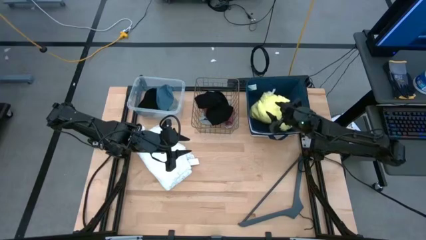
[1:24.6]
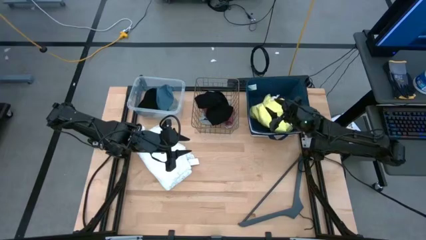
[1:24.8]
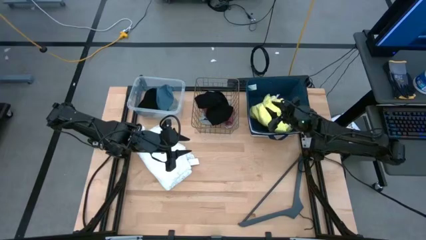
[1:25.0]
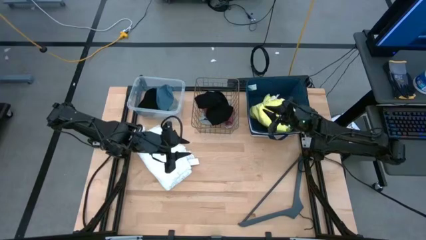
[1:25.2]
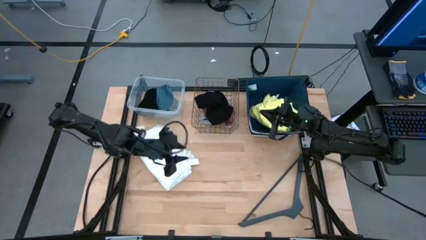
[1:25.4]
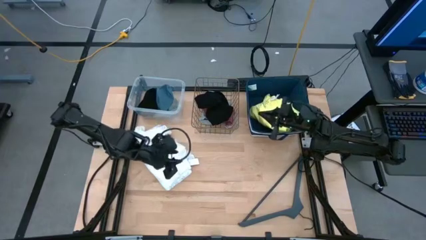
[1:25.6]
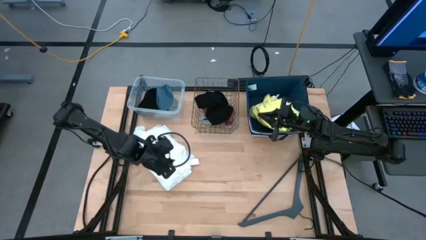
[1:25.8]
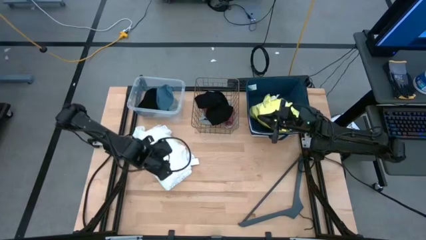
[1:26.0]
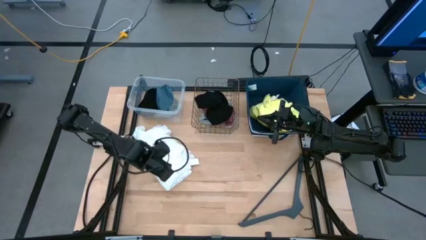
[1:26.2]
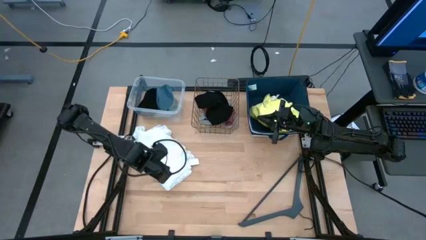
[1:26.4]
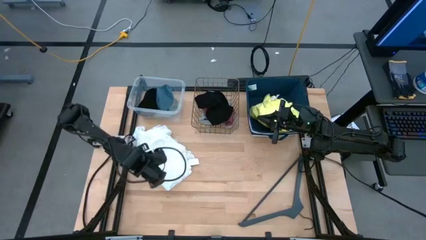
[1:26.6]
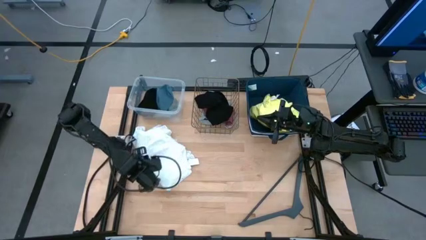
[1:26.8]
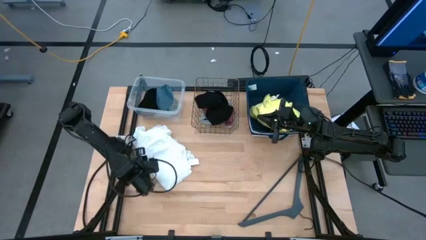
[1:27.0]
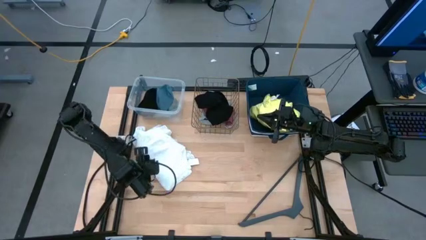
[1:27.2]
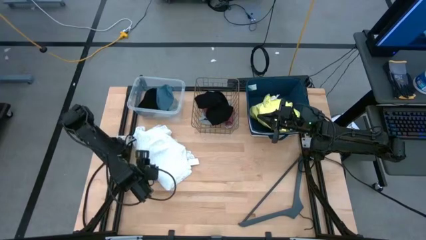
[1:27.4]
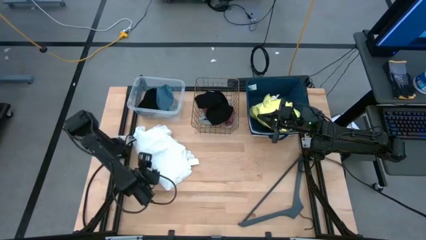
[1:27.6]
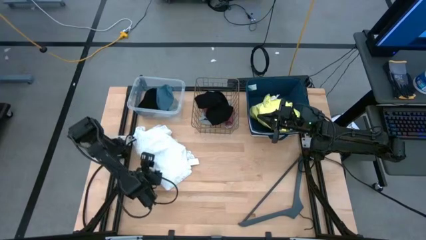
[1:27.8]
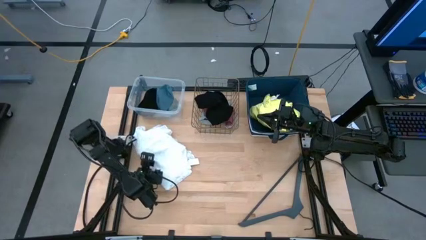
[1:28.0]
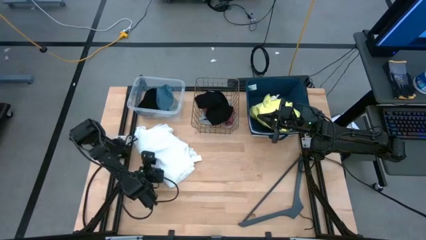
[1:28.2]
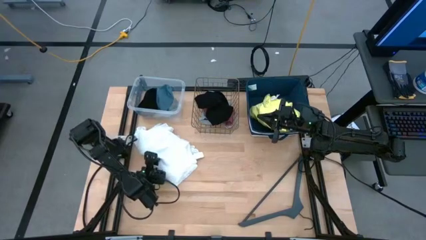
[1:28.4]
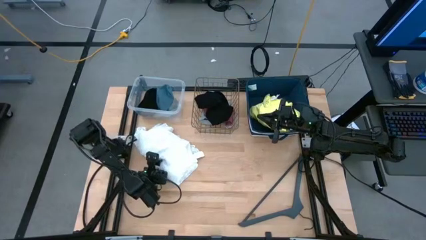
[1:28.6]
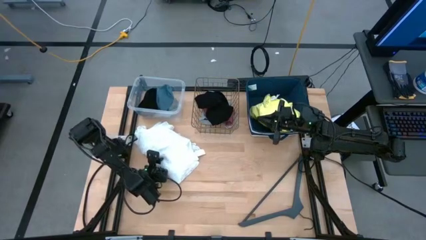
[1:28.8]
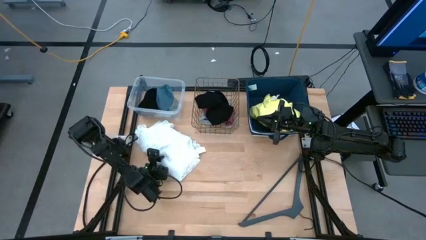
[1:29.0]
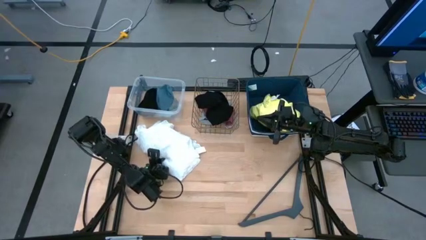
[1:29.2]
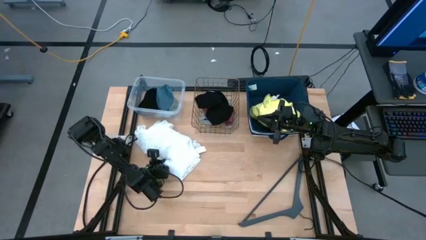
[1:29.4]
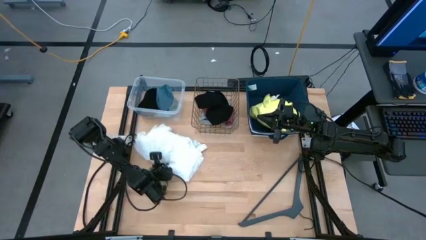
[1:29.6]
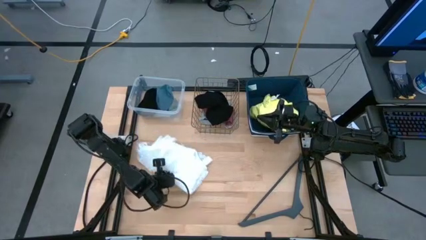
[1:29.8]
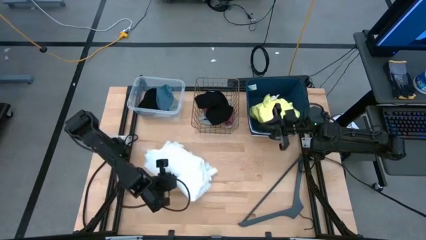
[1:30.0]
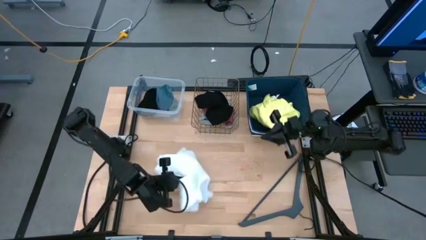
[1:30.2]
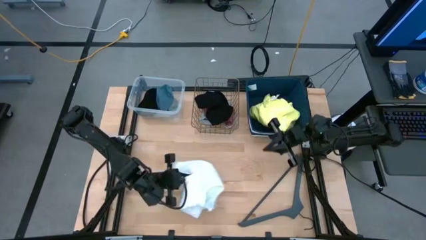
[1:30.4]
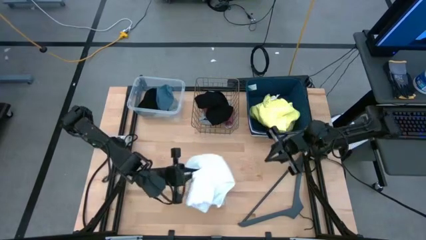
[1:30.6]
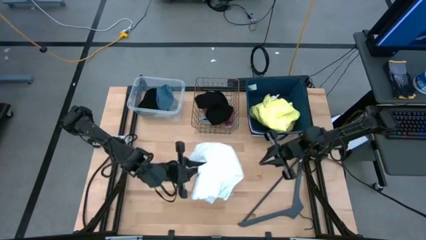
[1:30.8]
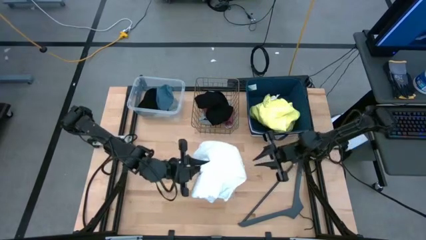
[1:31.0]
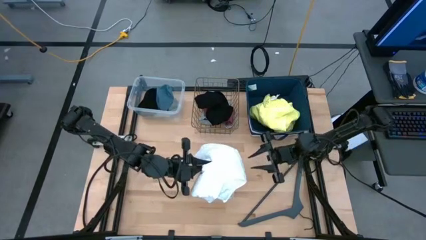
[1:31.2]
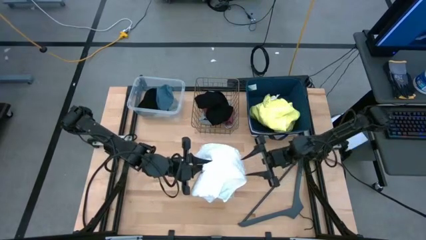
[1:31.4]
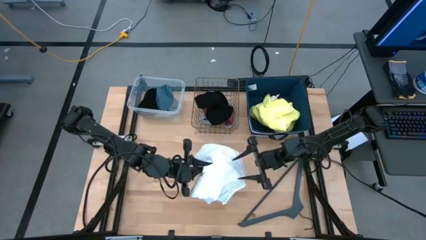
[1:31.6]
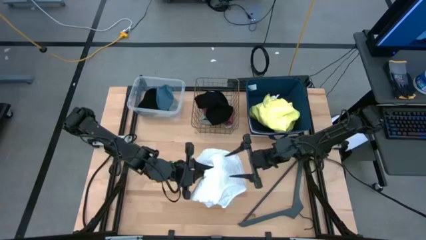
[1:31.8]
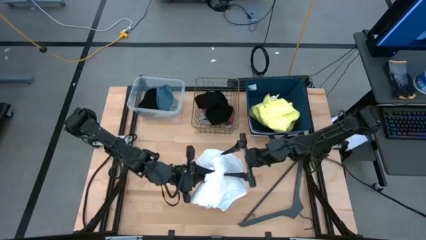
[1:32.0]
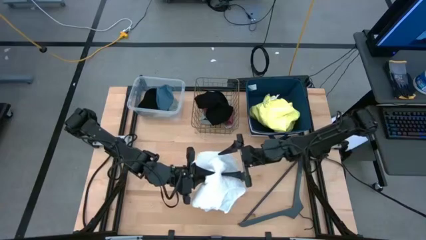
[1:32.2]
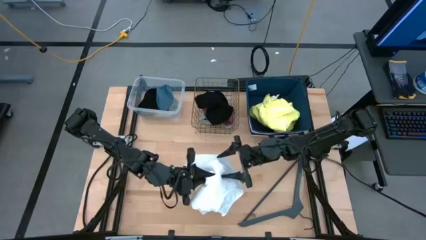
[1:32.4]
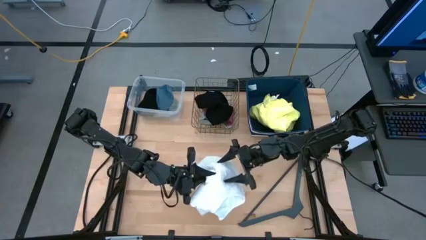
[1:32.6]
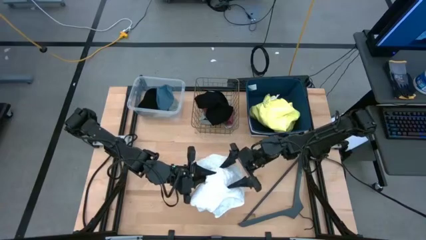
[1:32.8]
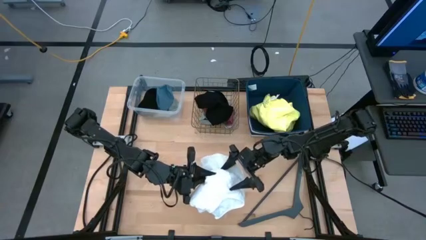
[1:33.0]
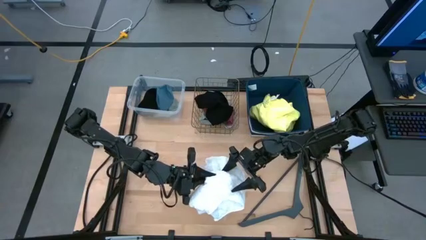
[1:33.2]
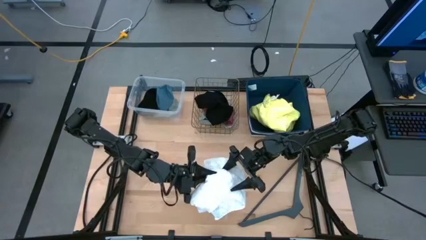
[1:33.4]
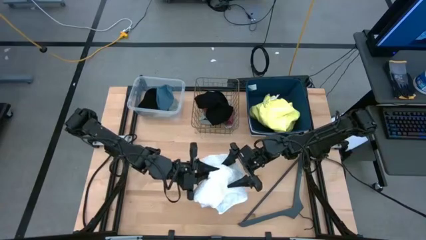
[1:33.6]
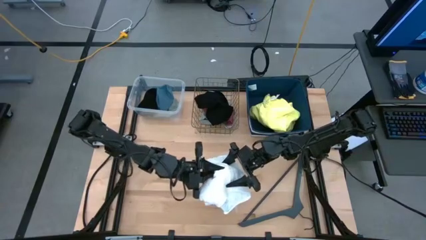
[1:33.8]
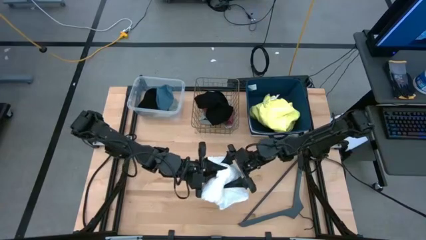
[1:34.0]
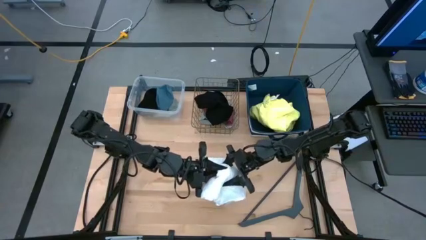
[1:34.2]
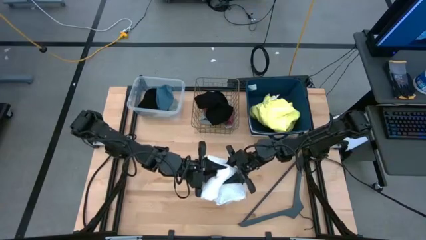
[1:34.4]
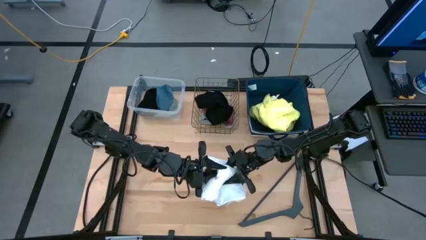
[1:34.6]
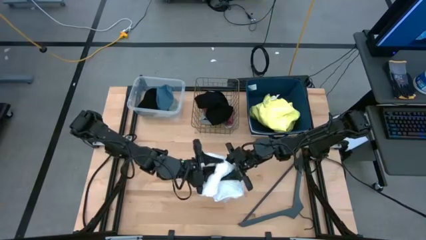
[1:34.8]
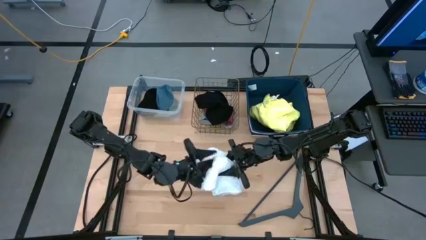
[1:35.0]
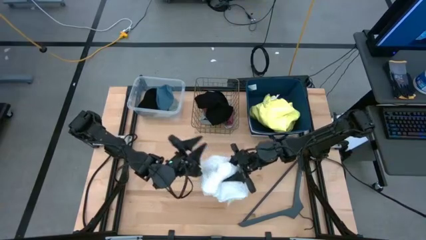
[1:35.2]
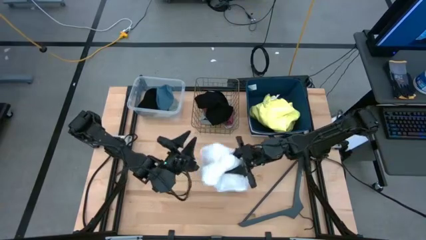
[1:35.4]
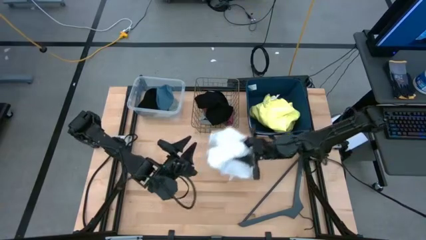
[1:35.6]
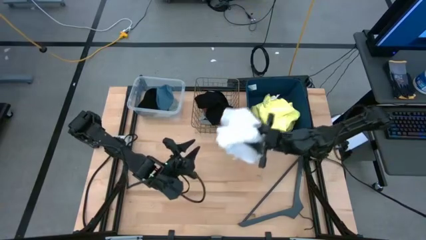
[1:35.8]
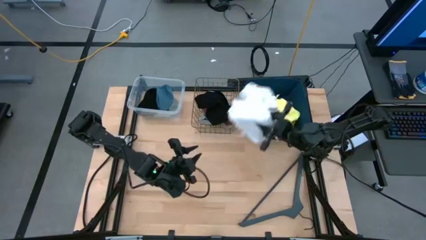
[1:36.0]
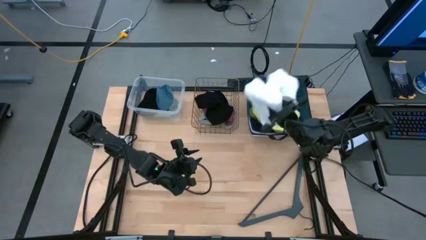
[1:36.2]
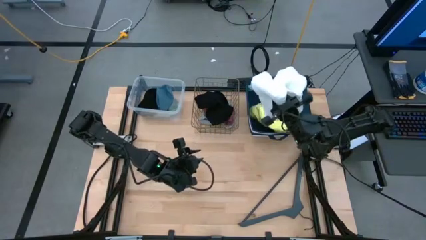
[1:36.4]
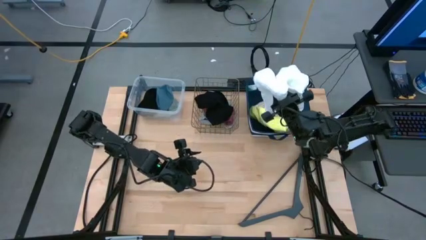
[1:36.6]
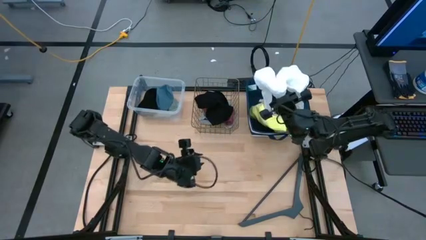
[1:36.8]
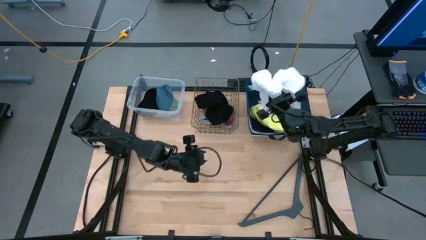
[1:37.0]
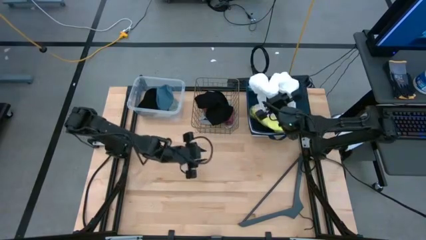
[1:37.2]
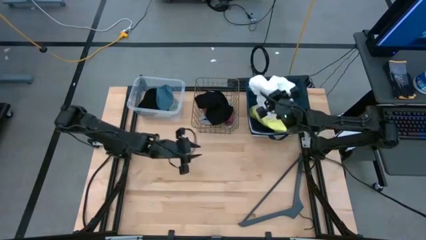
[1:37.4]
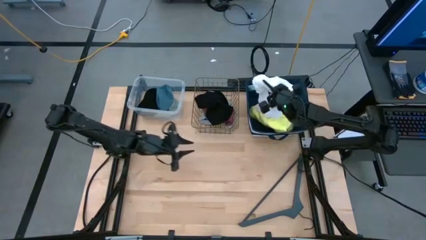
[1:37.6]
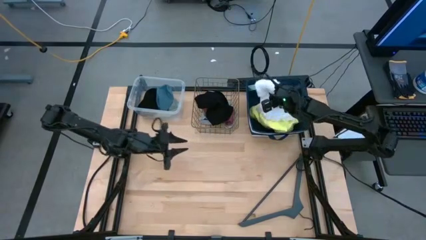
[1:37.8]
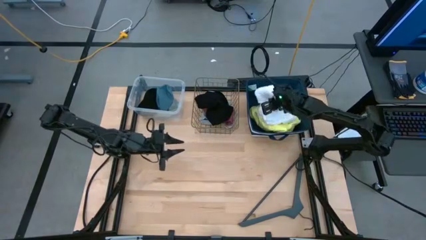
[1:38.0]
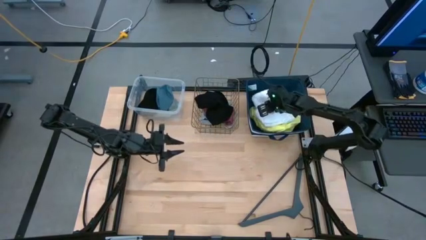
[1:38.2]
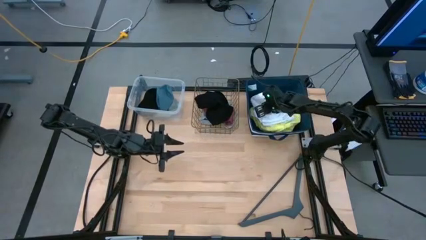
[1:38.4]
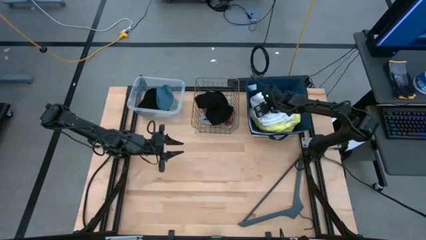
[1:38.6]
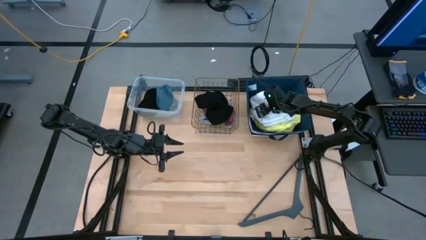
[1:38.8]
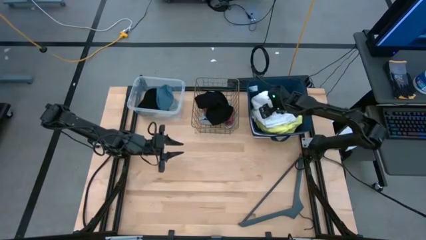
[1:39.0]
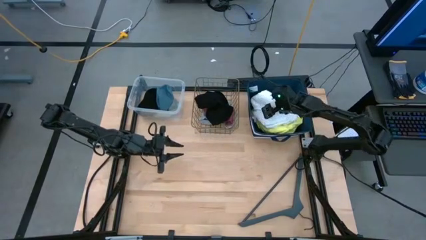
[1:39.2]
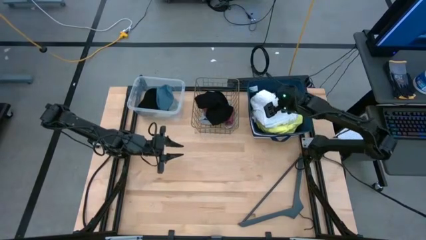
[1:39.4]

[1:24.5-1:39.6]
Task: Pick & Place Cloths
Put the white dress into the laundry organizer
